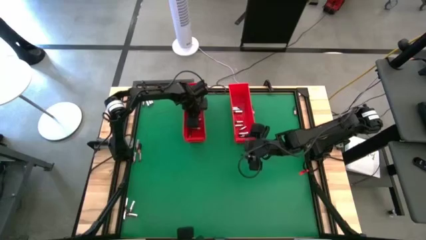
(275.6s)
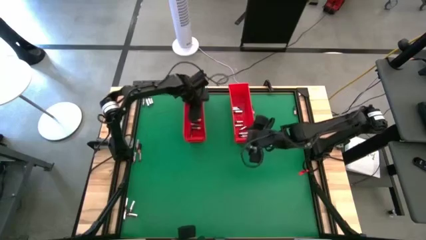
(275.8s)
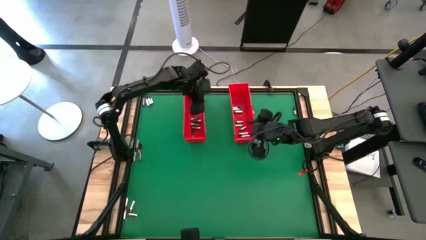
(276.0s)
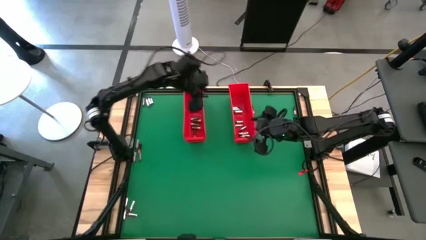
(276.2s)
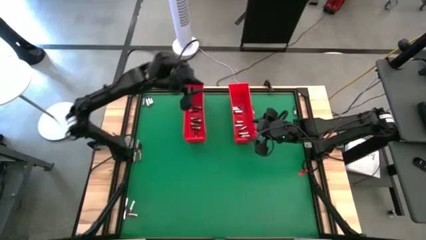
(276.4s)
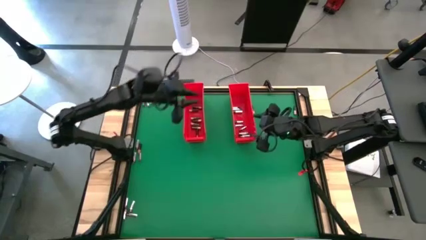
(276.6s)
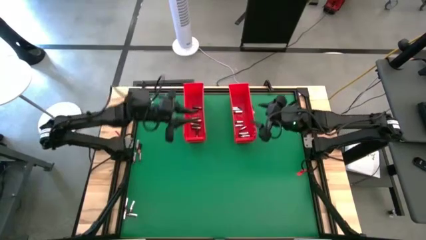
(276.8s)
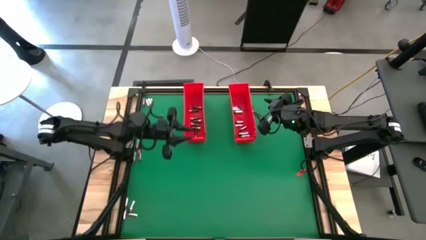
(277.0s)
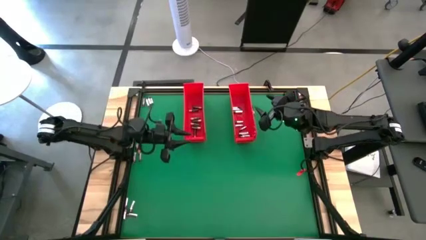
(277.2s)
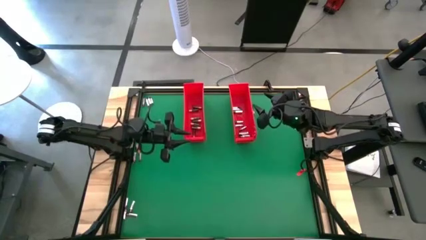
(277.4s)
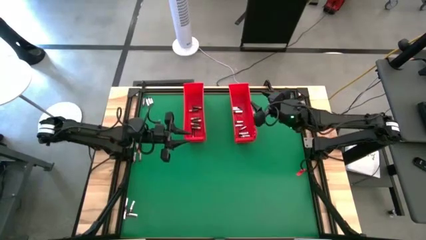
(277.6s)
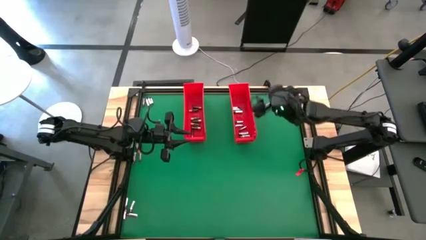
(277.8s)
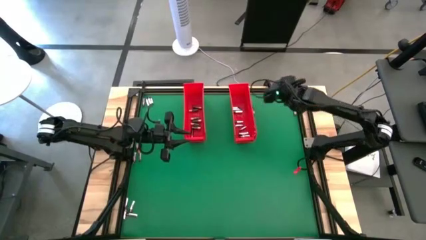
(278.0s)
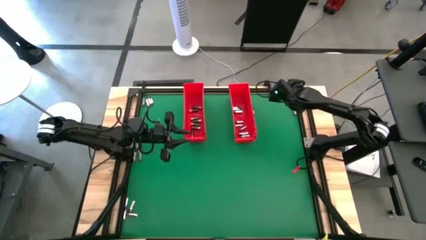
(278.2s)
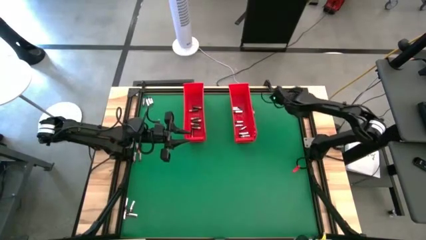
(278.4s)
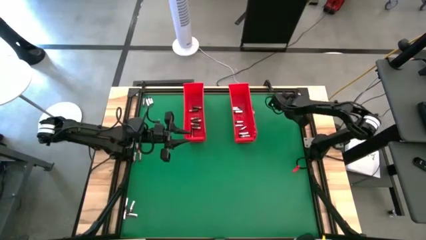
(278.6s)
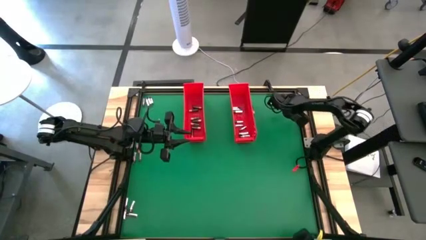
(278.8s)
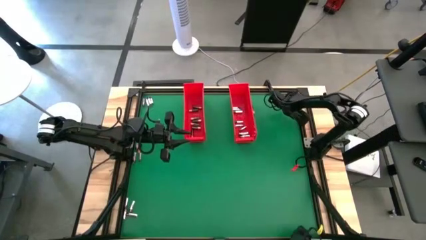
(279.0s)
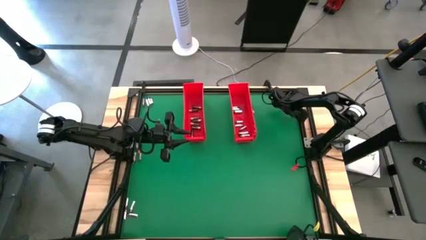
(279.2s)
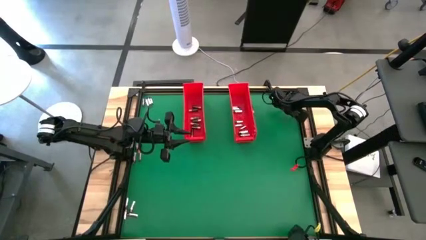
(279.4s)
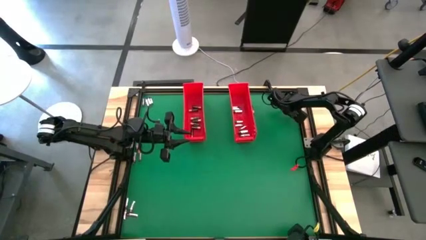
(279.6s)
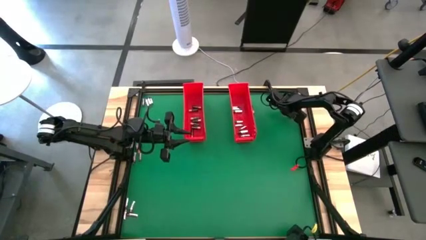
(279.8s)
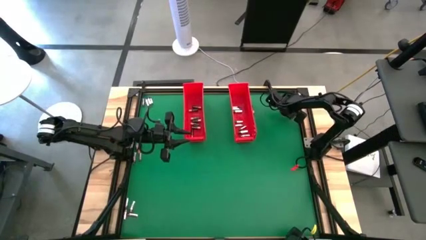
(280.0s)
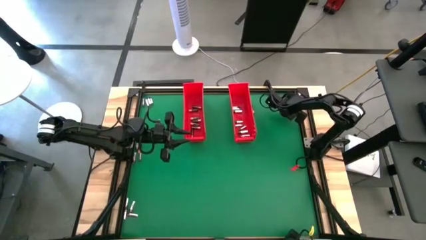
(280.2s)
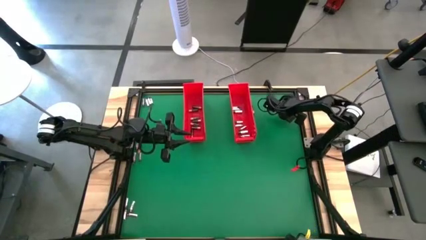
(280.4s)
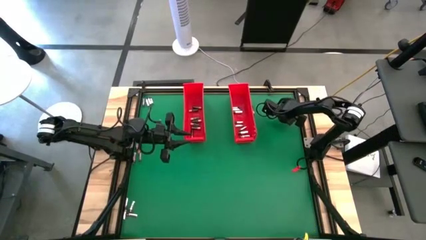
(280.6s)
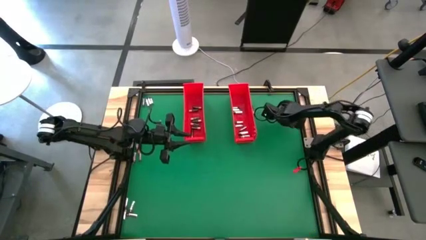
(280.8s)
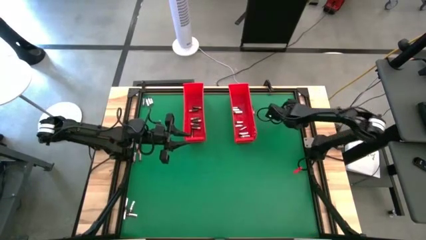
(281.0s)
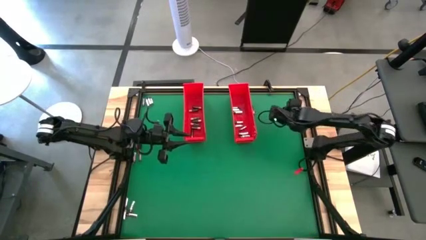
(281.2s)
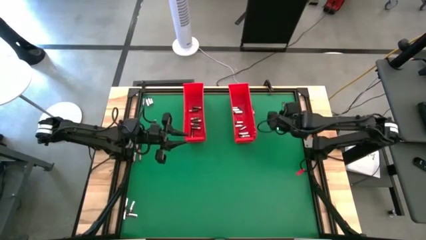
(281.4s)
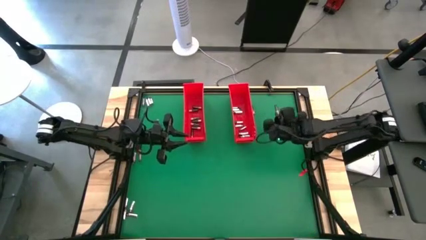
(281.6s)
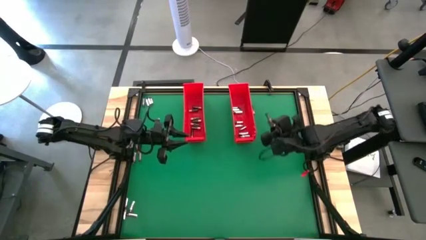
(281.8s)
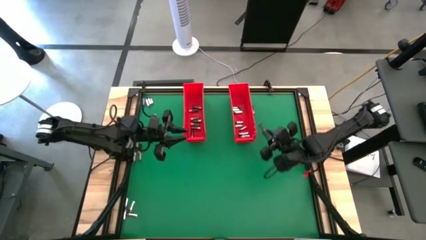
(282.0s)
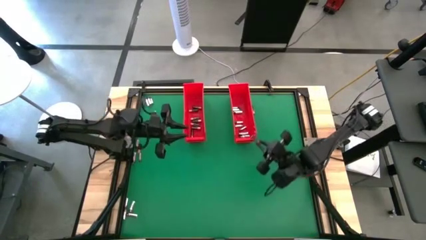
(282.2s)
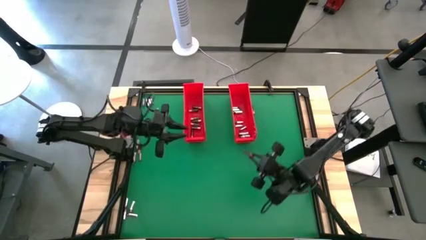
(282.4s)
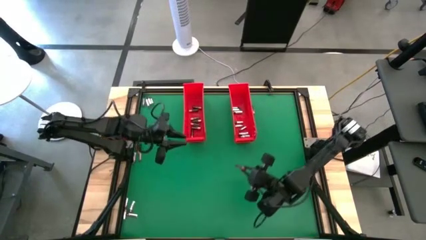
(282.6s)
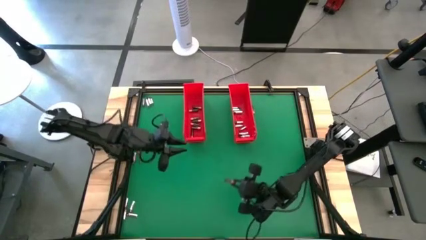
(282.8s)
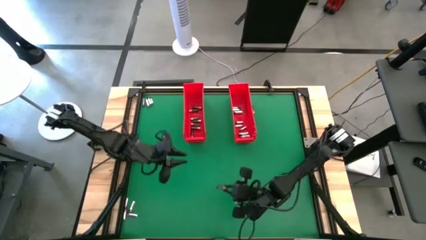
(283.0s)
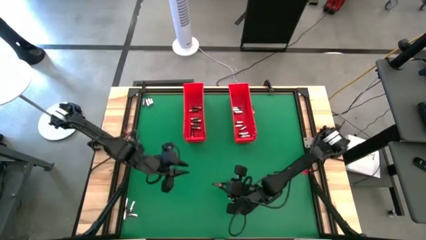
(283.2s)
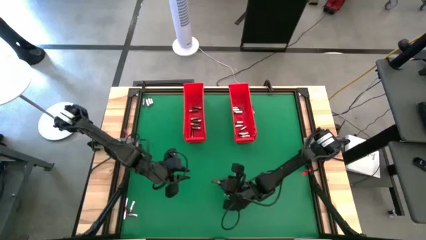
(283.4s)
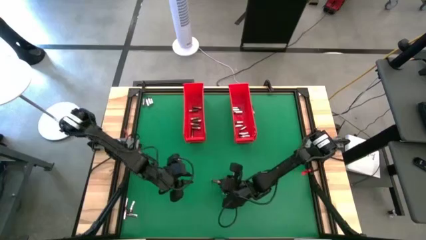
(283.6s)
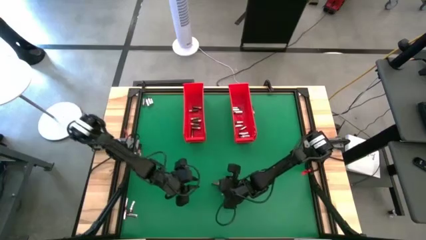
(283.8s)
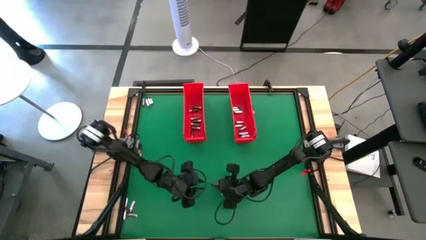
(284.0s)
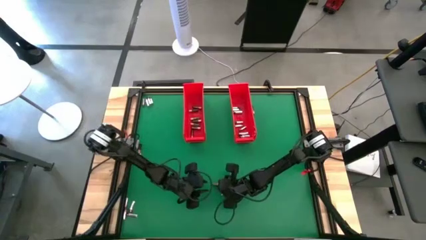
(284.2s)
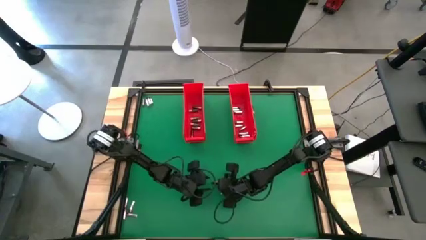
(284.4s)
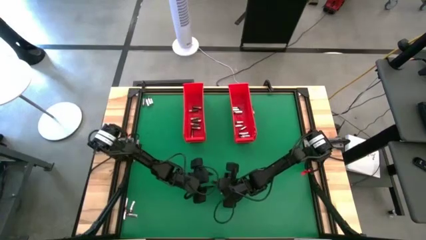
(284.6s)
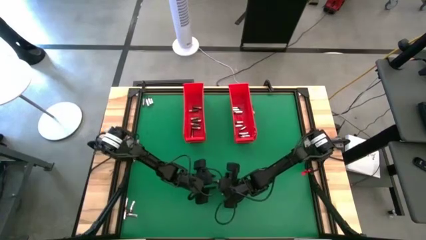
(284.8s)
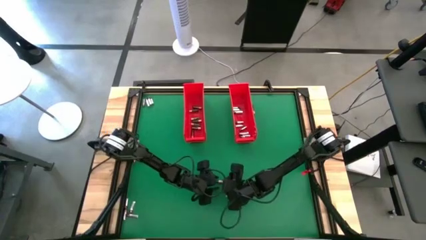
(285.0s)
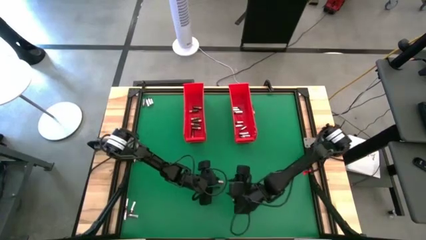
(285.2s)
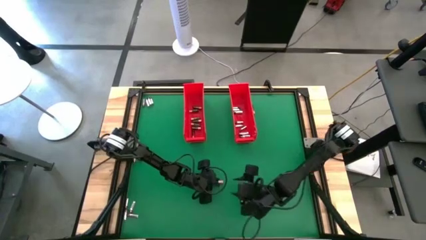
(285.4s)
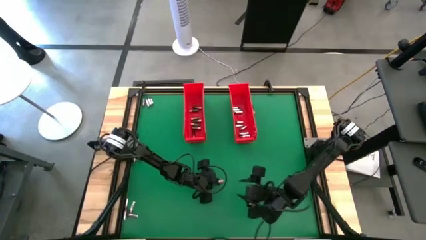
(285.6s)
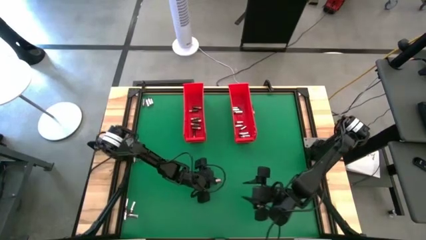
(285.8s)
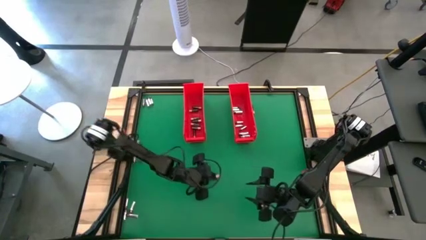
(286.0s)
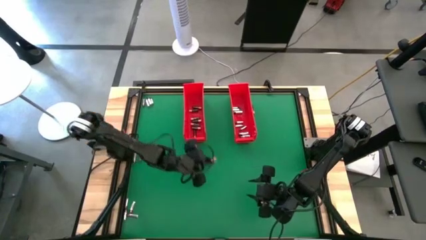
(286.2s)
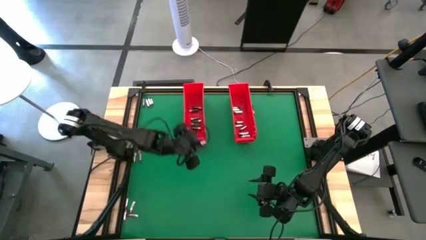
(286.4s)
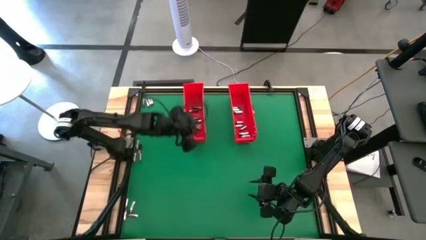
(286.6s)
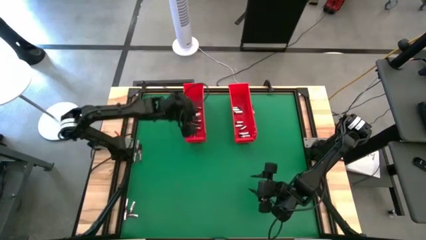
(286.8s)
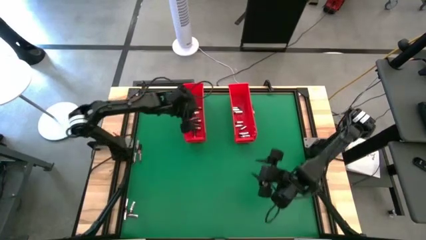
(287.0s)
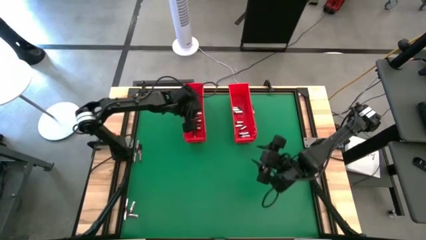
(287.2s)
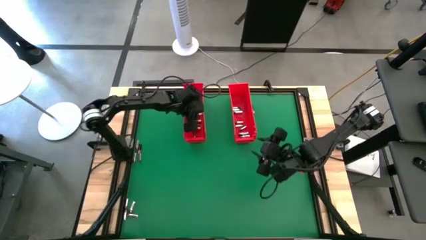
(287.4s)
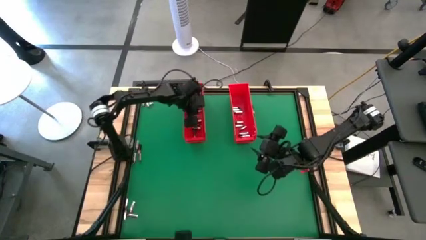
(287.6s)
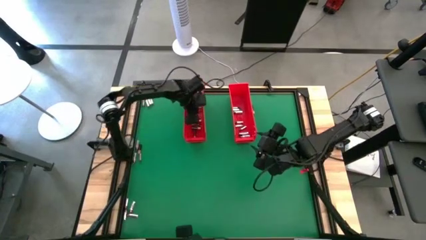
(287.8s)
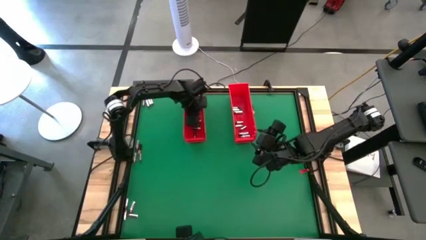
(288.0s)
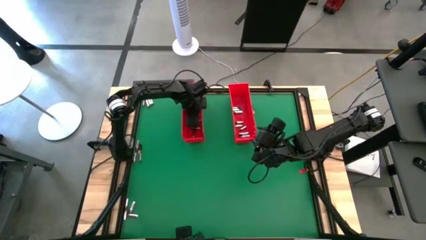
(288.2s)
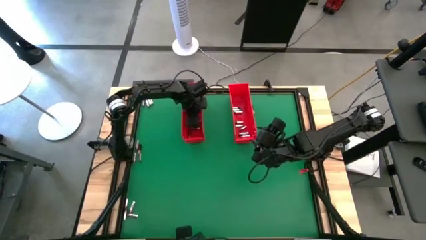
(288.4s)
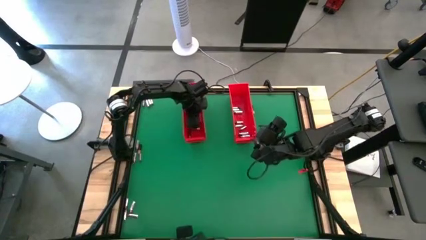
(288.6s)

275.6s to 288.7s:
Task: Sort batteries
Put the brown battery into the left red bin

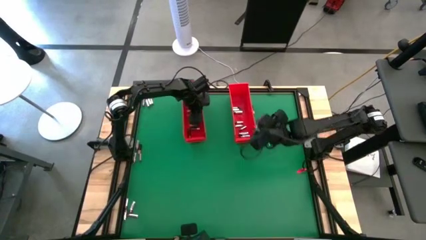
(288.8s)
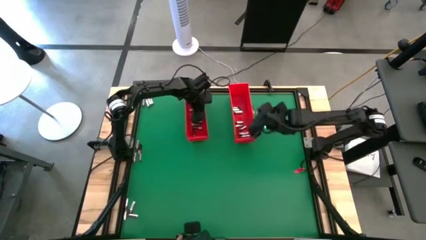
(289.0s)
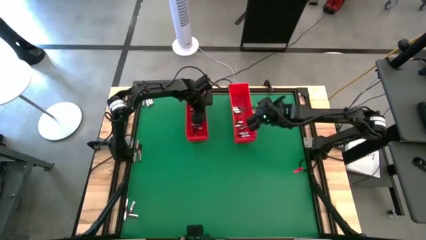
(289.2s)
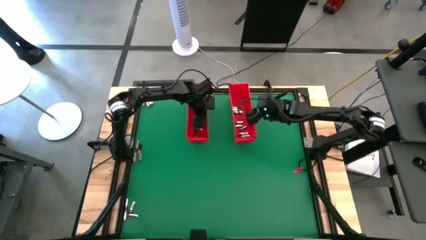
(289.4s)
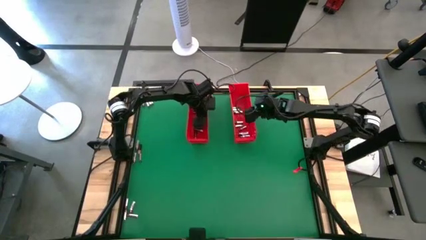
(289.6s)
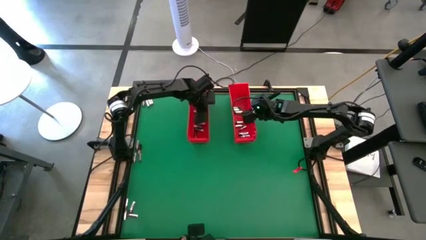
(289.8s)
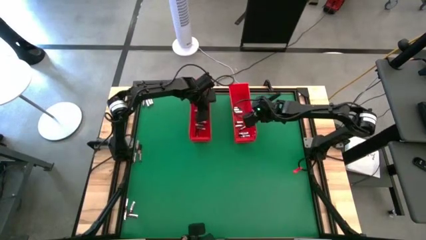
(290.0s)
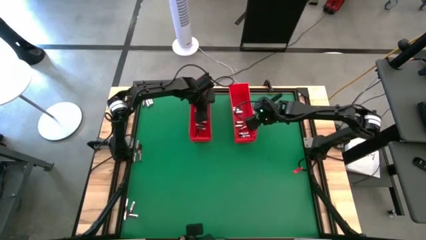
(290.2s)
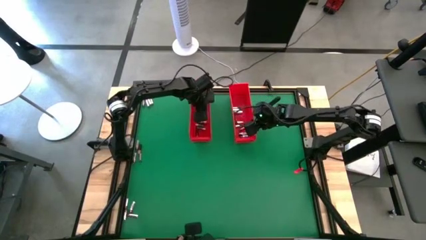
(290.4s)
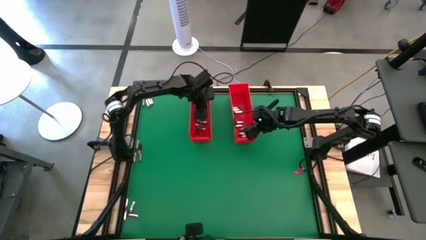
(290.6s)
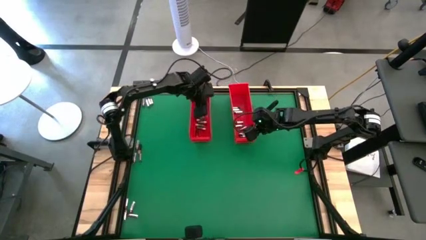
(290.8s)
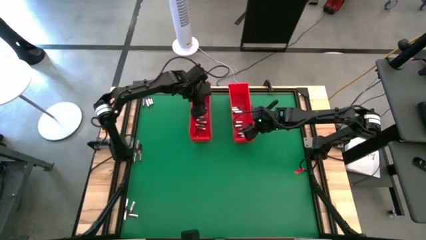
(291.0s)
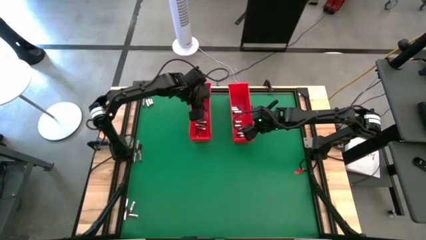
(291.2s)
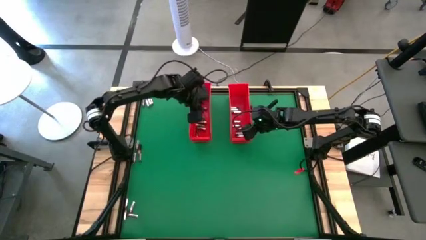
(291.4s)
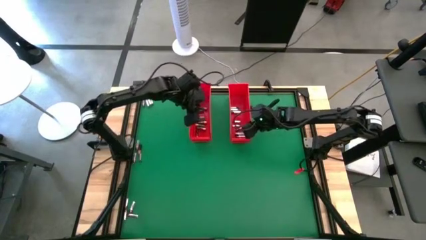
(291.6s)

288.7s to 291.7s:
Adjust the left red bin
